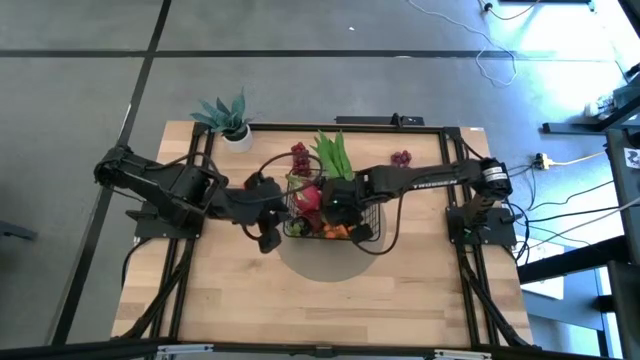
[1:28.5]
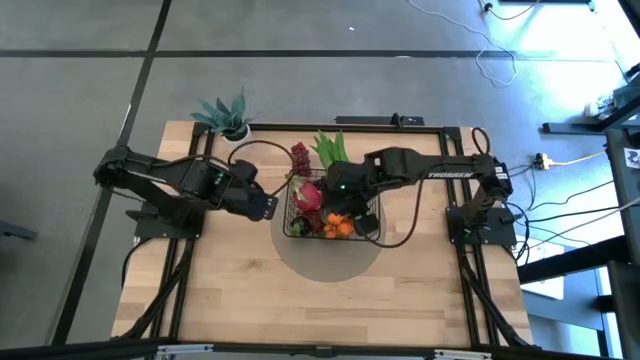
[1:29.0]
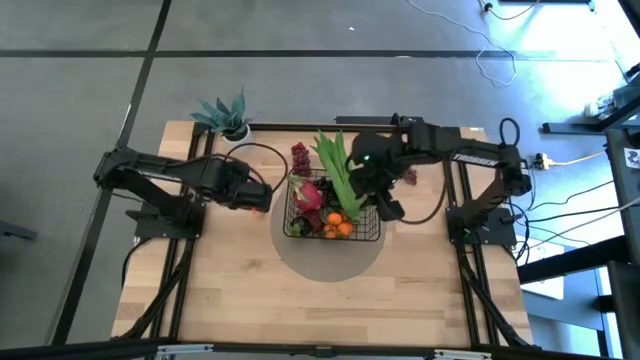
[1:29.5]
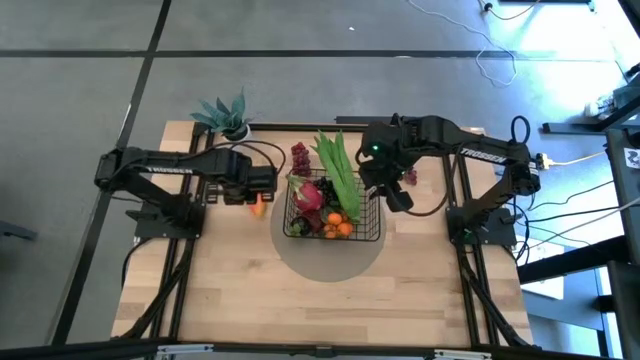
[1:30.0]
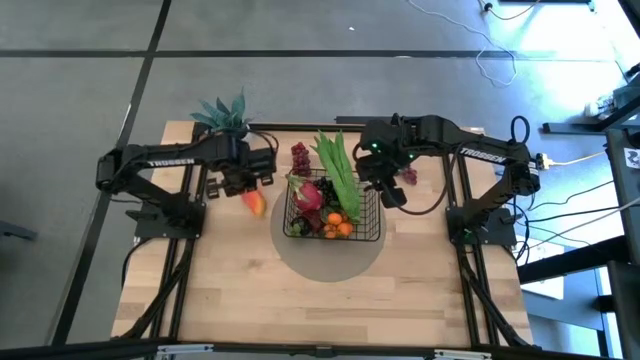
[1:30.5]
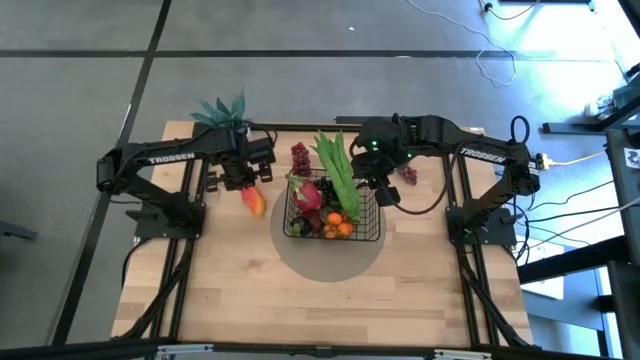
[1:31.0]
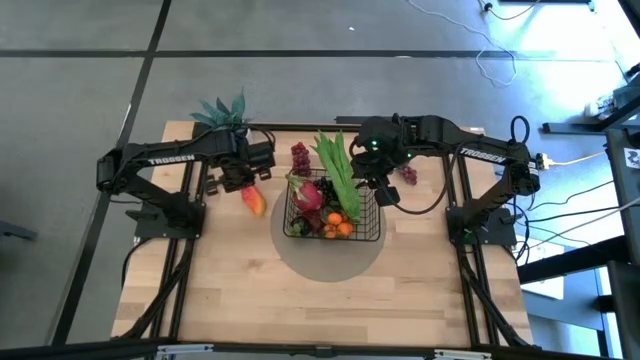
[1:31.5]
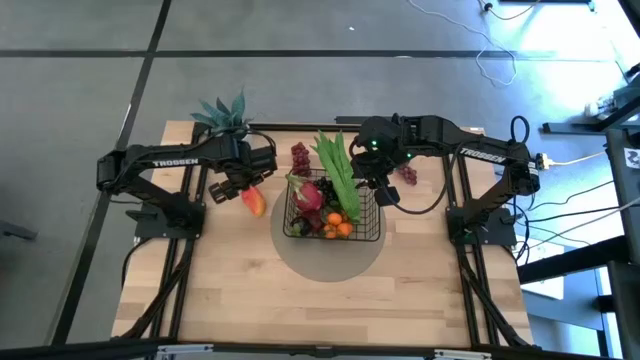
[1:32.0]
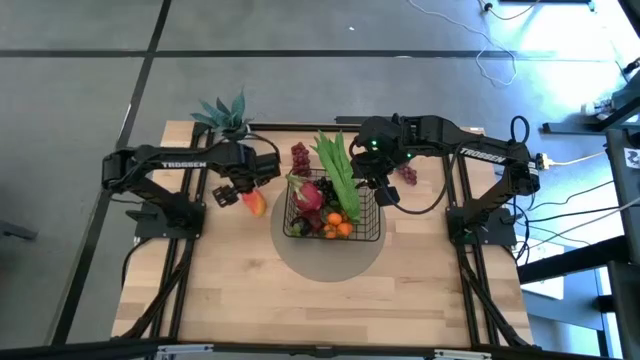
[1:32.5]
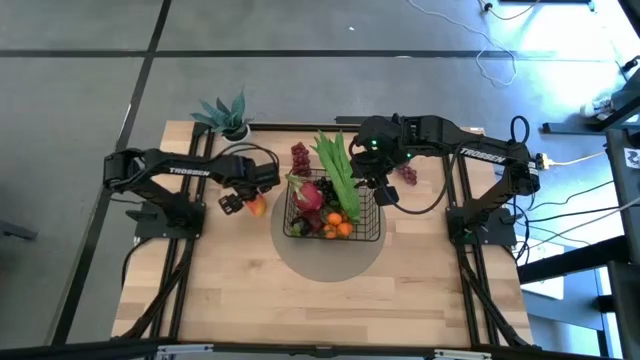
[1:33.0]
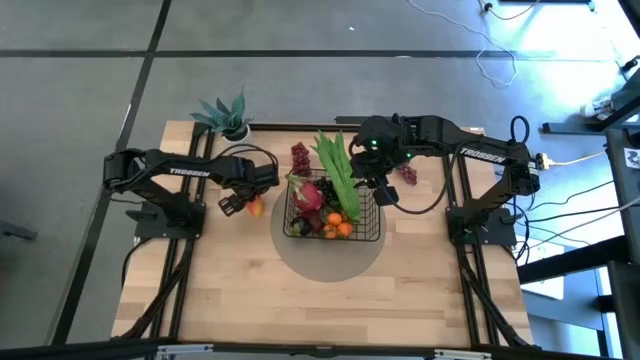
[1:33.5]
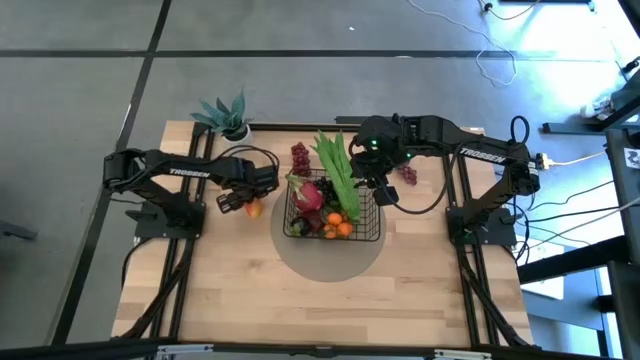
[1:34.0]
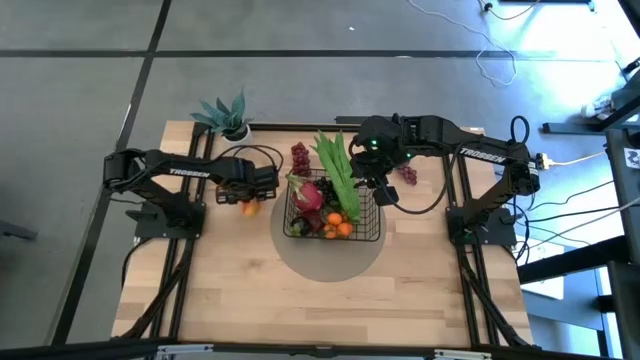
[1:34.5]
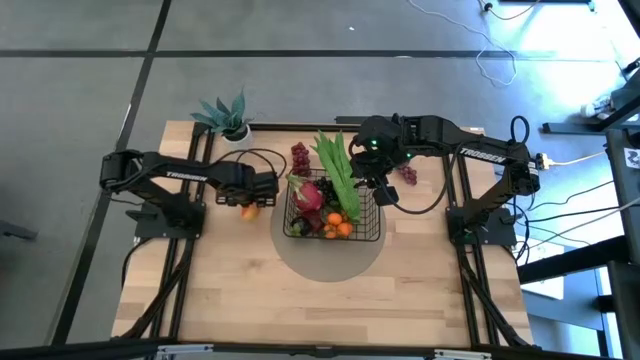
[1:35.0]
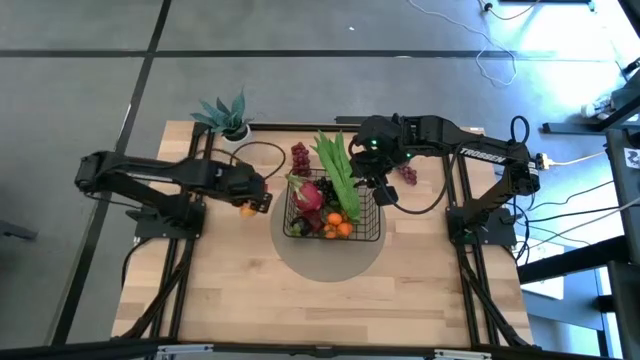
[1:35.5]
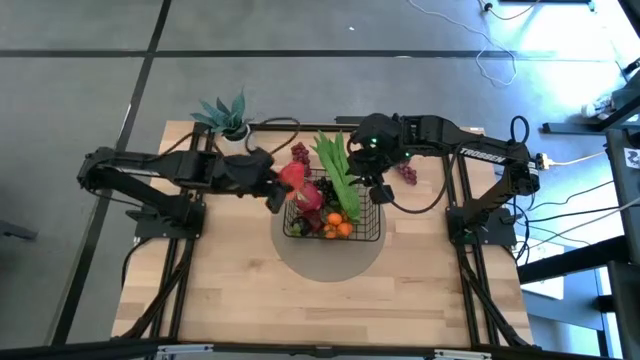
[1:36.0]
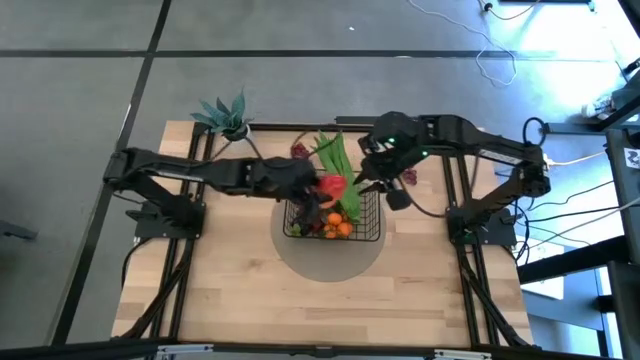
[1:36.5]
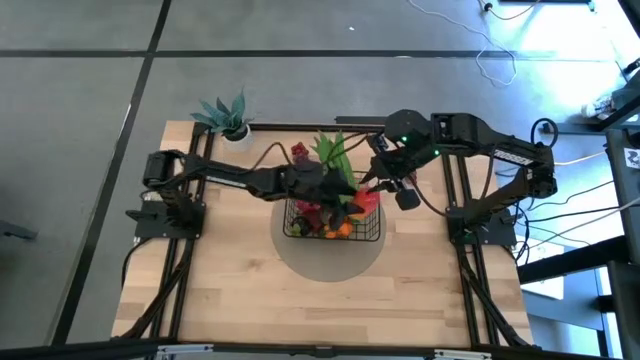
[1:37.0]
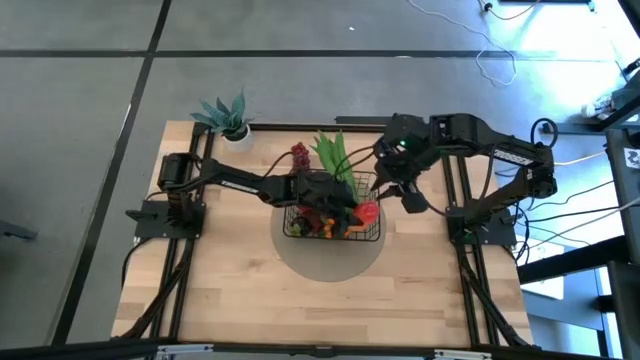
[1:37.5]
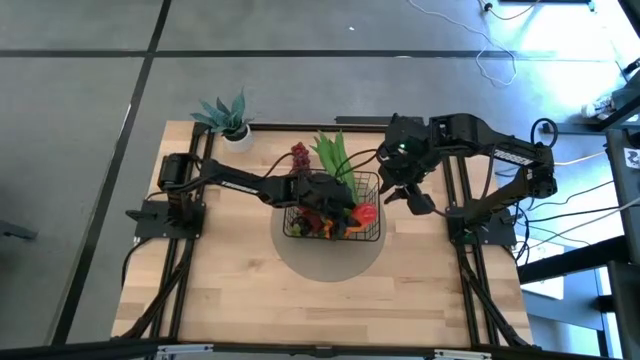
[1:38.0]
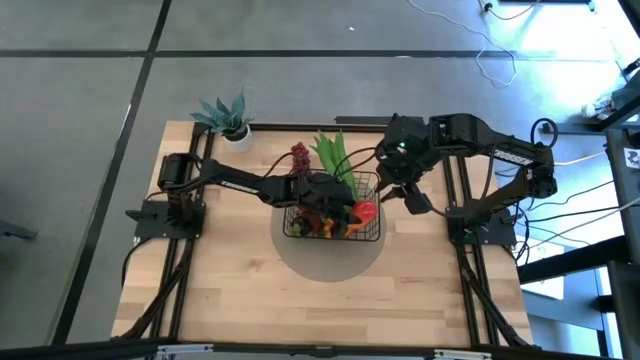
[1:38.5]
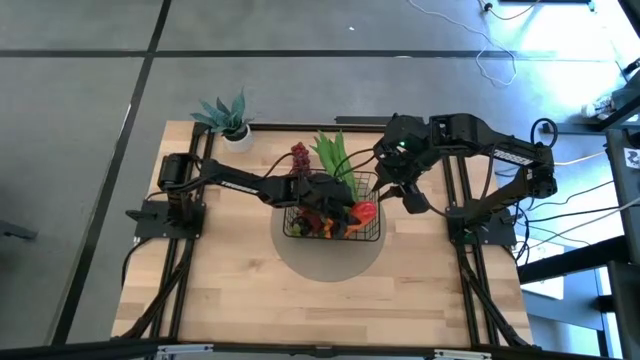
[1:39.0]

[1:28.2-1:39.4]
Task: Build produce basket
Put the red mango into the black wire basket

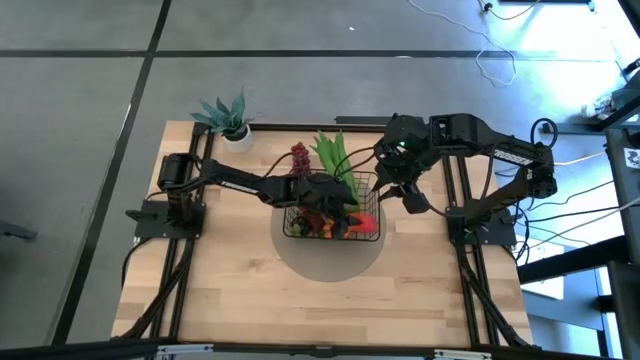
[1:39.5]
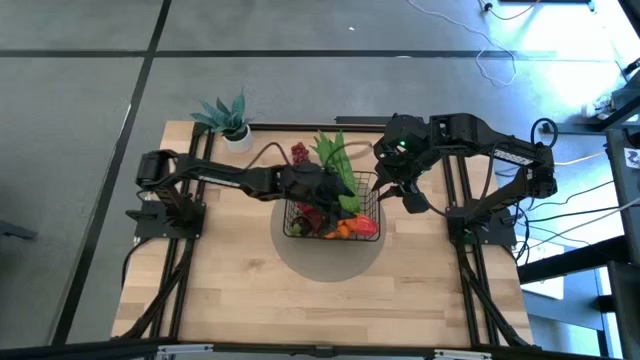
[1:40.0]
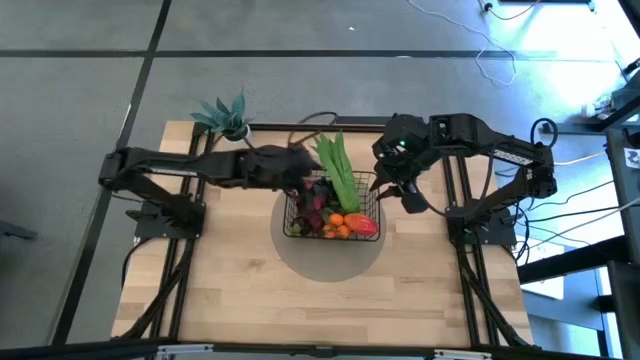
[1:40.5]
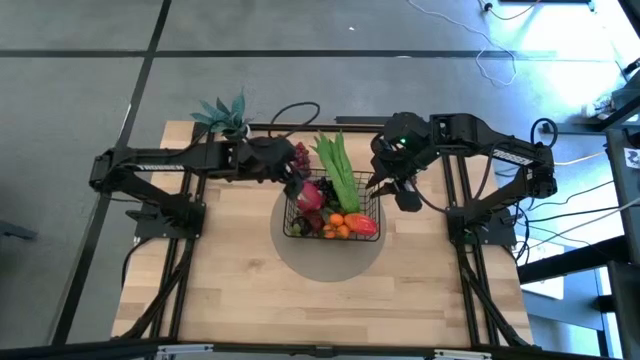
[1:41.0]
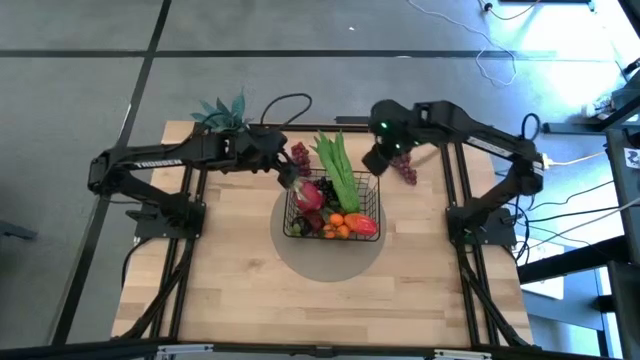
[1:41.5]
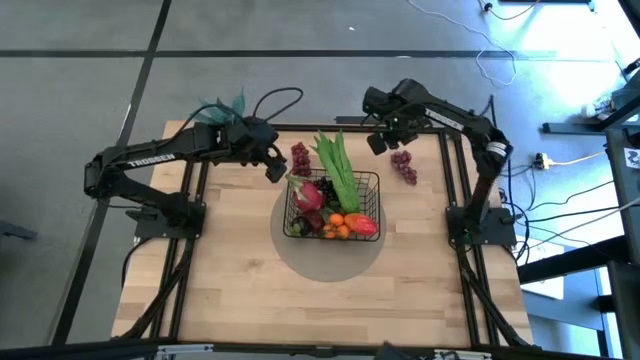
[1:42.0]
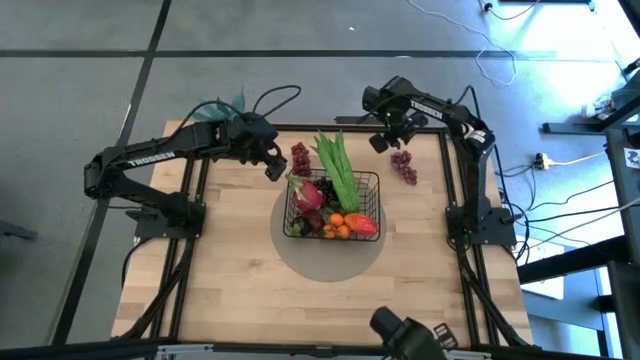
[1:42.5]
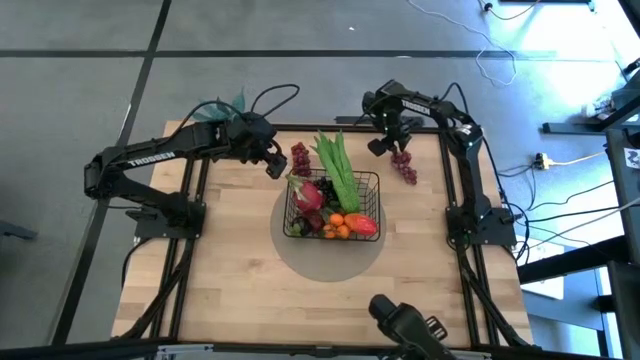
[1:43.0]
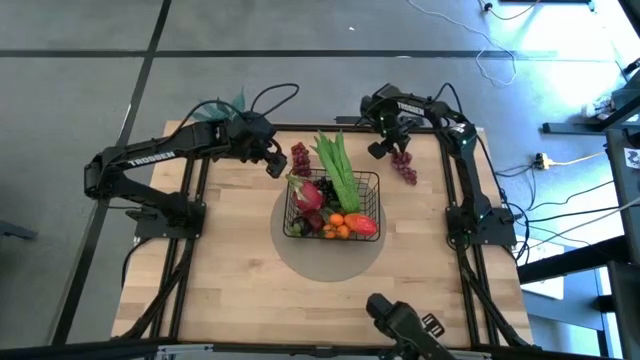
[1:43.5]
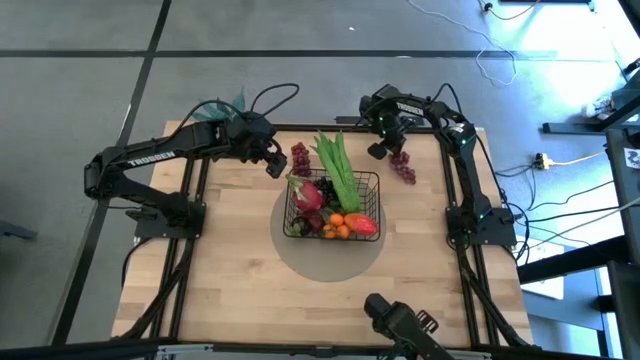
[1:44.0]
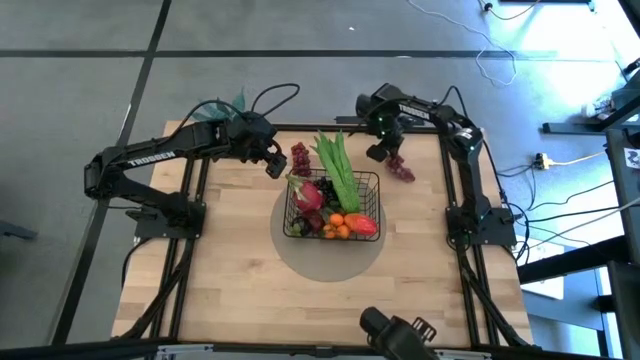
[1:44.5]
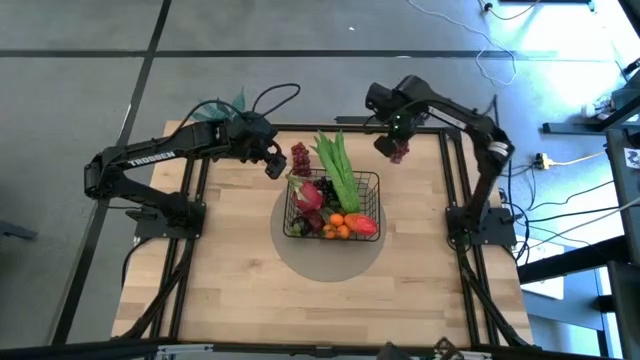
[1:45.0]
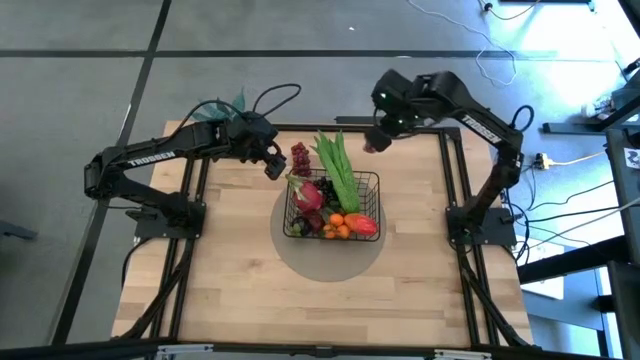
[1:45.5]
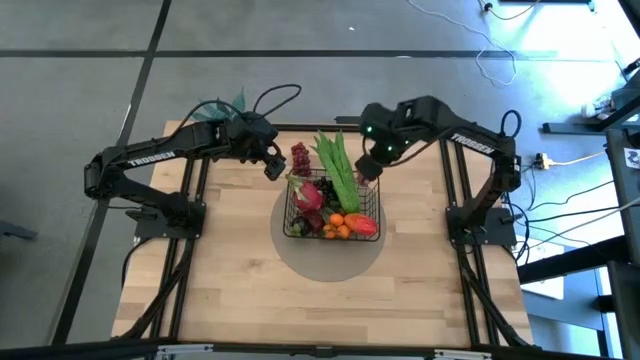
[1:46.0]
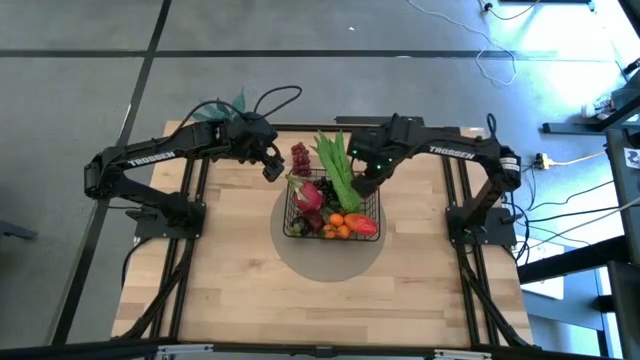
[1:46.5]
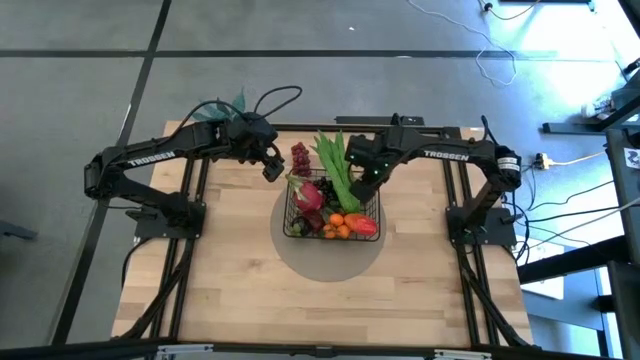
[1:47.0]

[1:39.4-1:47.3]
Put the right red grapes into the black wire basket

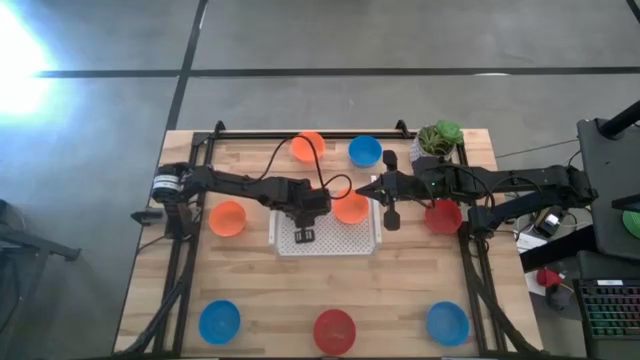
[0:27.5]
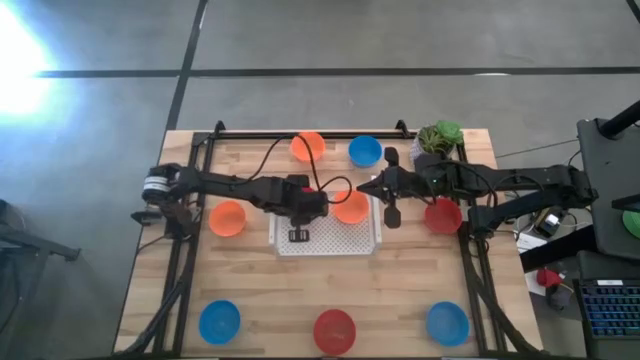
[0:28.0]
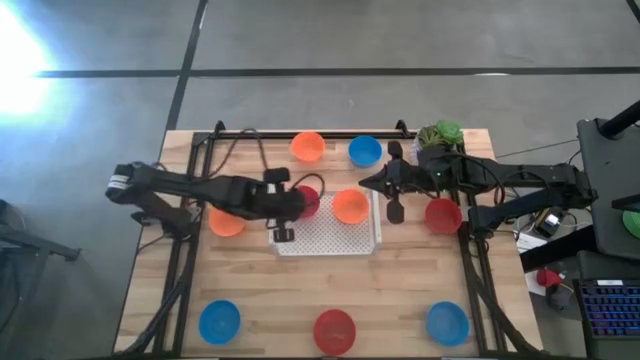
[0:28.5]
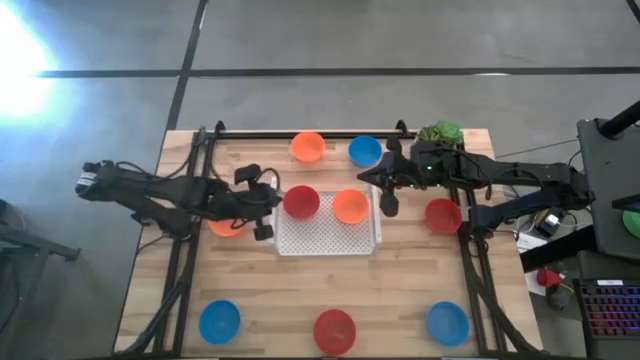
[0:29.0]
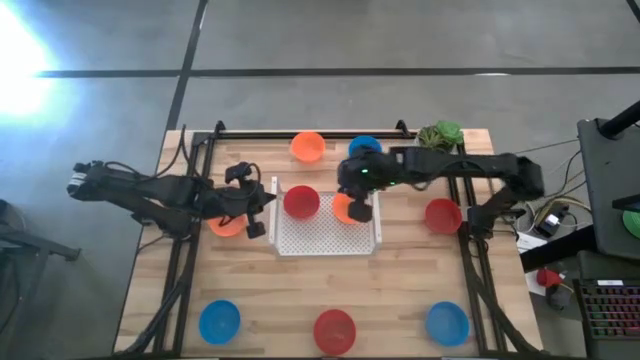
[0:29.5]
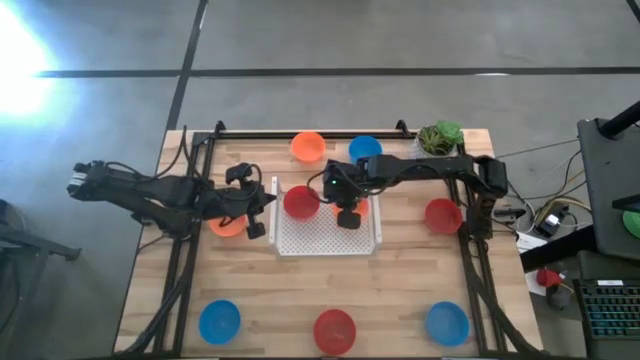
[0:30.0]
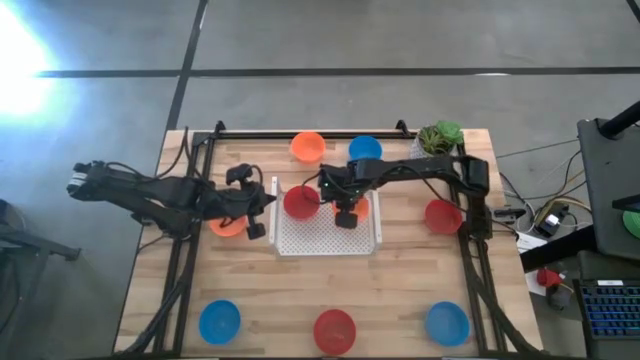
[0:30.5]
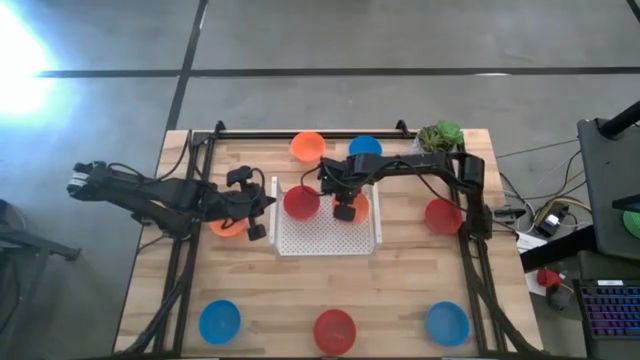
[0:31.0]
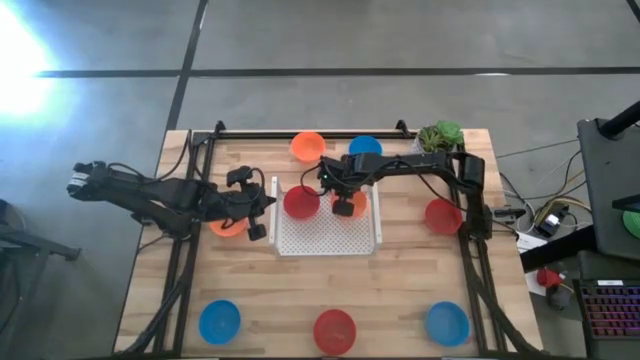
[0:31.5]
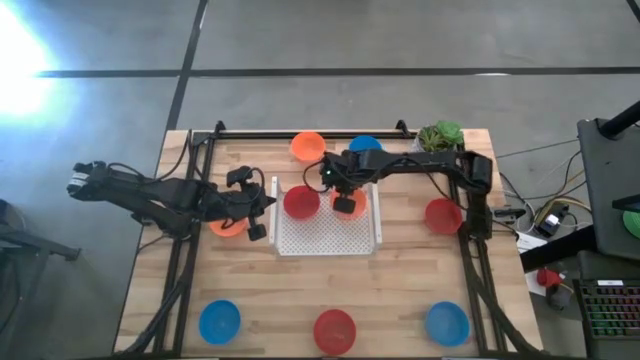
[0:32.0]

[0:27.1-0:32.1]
Task: Pick & Place Mini bowls
Adjust the orange bowl on the shelf
